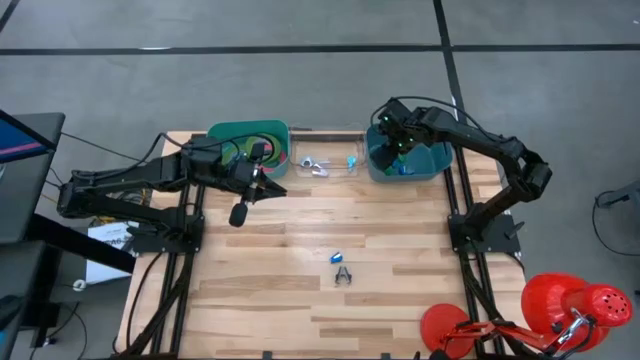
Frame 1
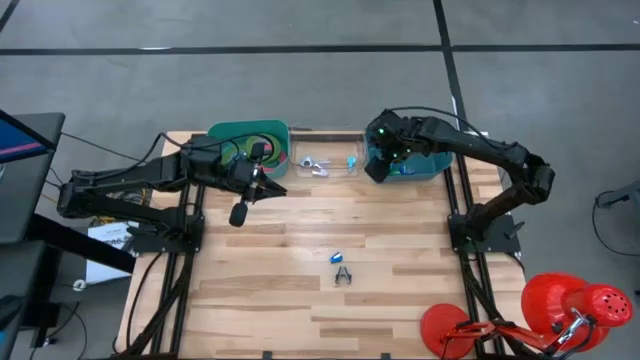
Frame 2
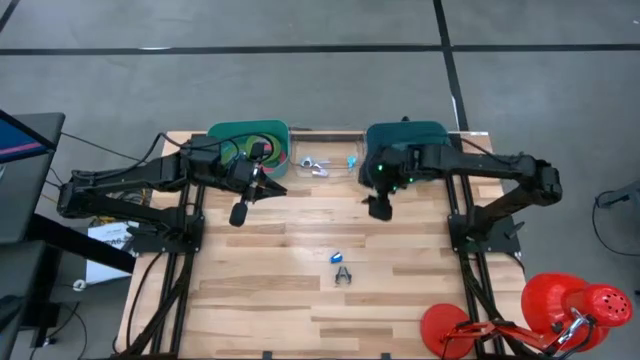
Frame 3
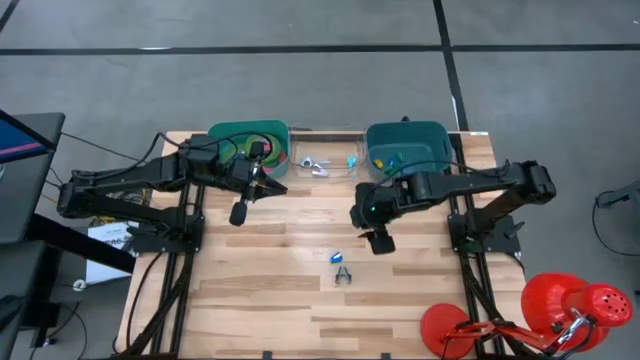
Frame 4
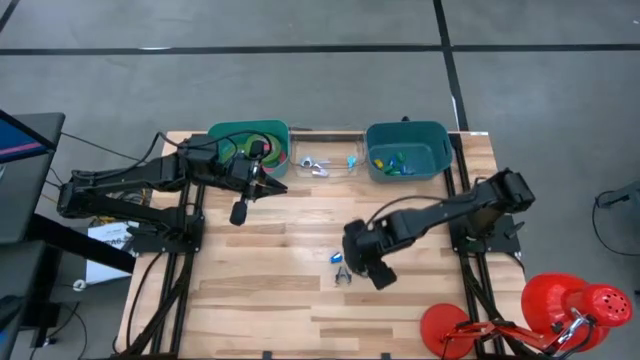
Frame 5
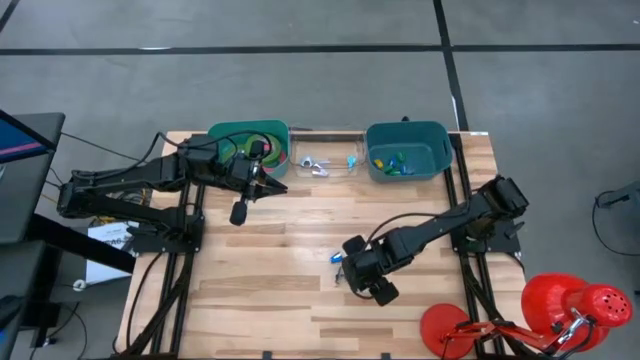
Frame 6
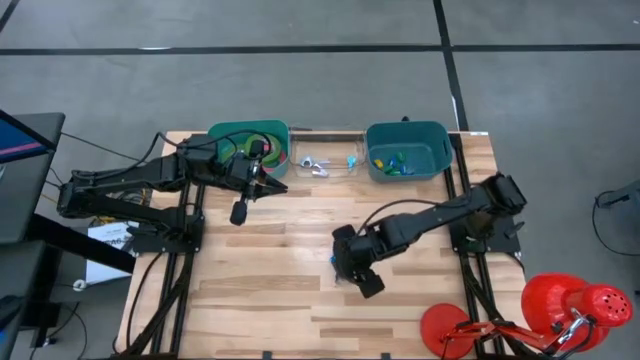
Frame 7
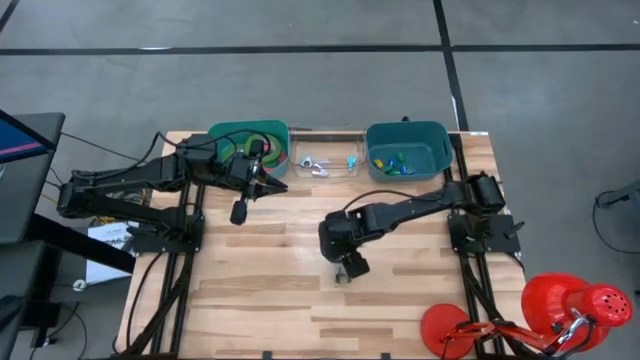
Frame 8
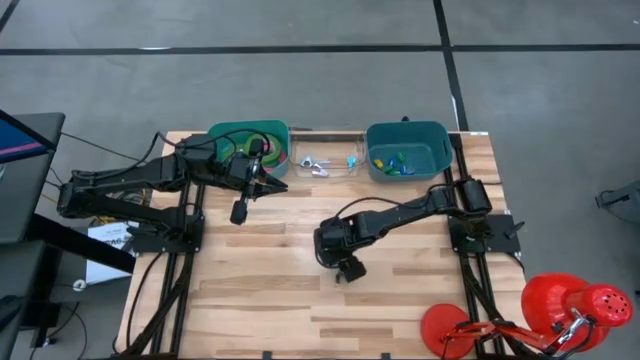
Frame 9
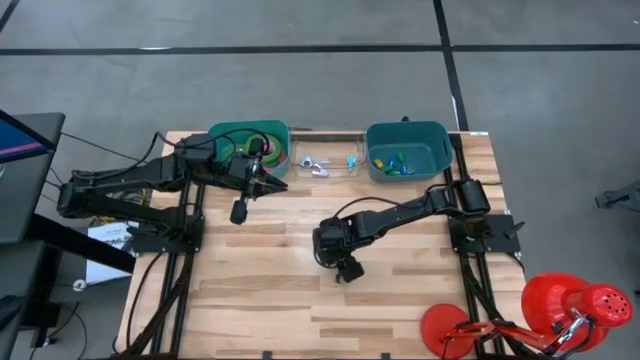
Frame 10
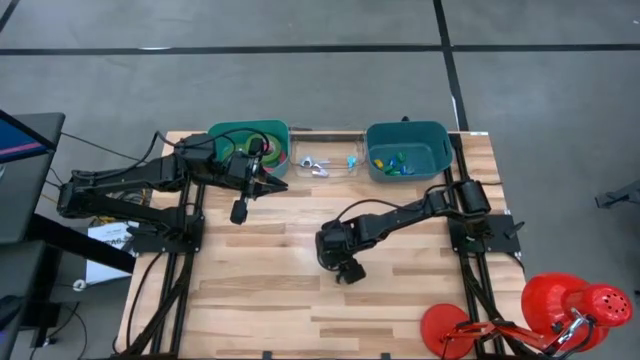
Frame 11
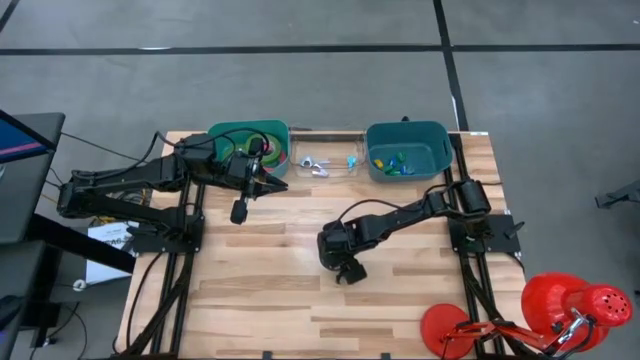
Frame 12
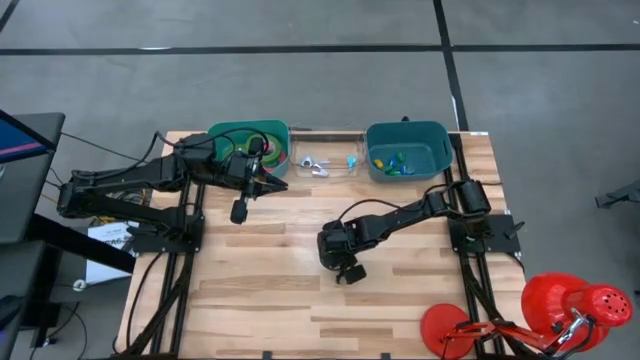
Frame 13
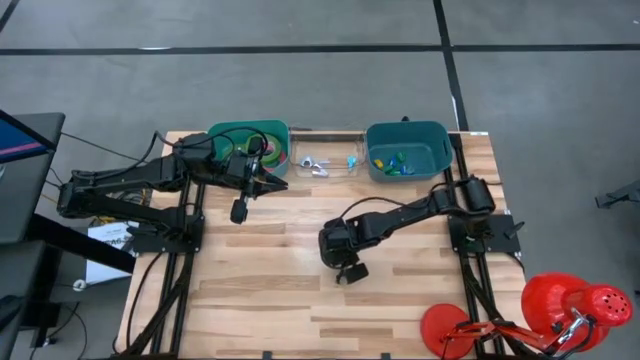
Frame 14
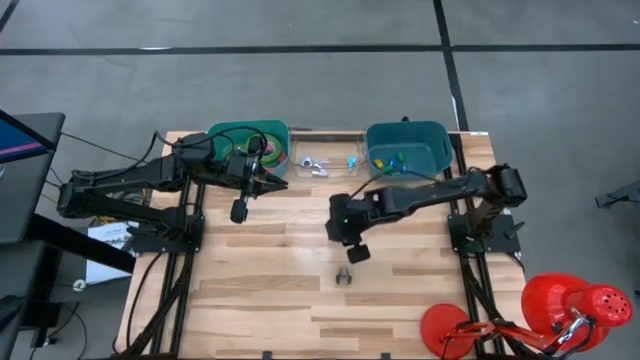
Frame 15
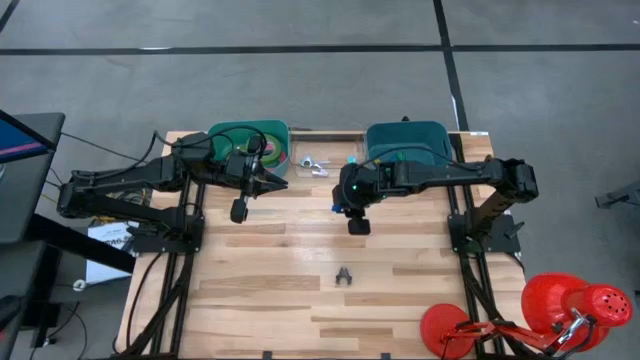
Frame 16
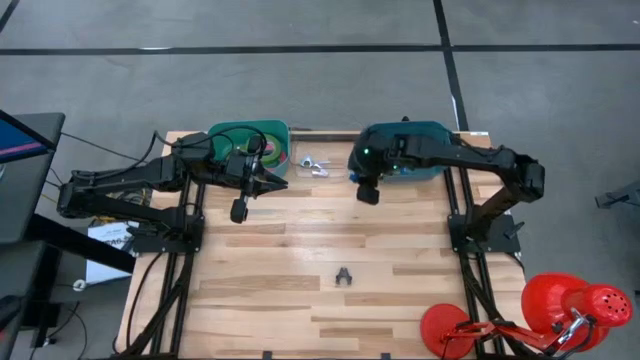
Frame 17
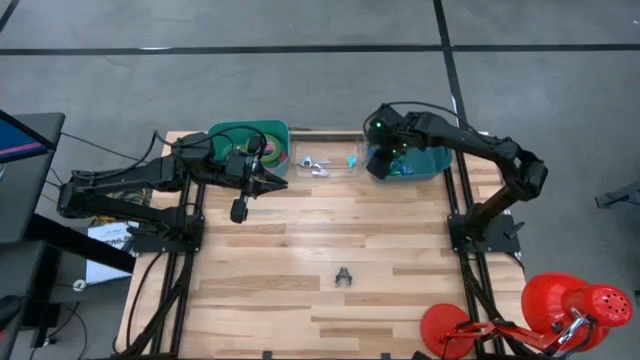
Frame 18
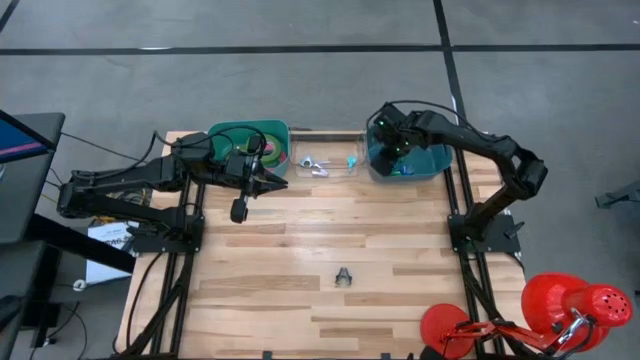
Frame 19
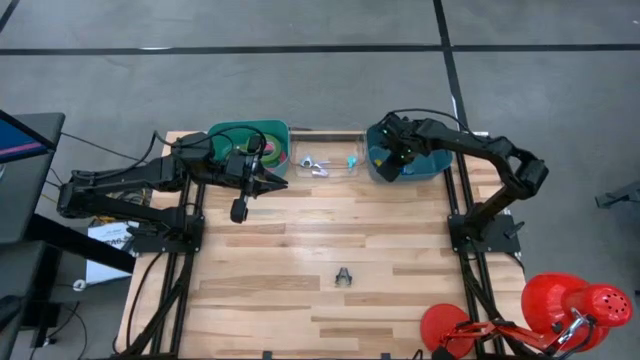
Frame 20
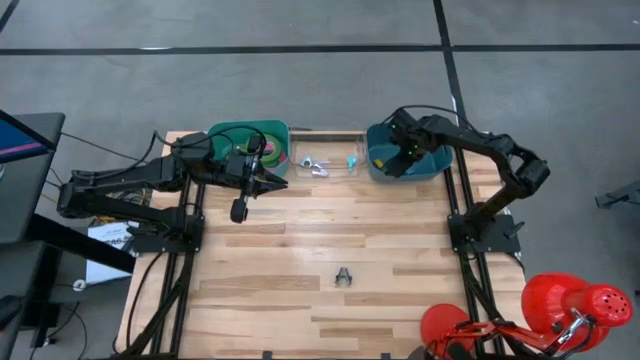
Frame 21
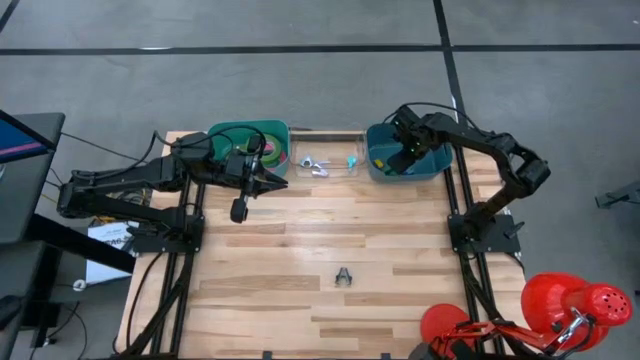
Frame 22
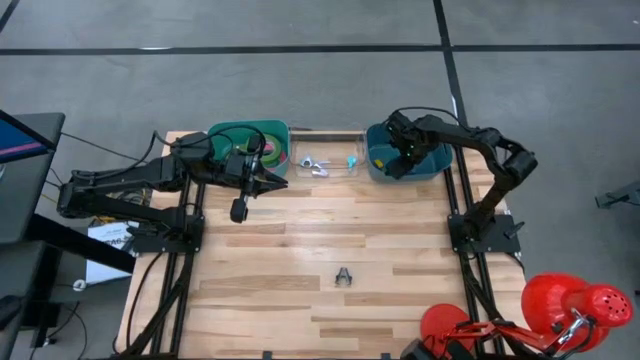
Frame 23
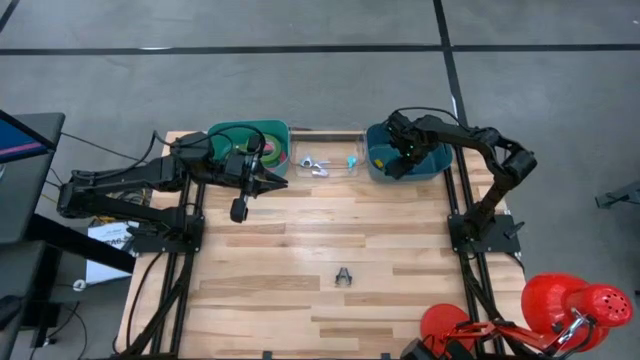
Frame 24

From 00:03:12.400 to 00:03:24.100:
Task: Pick and place Stapler, Stapler remover, tape
Put the blue stapler into the dark blue bin

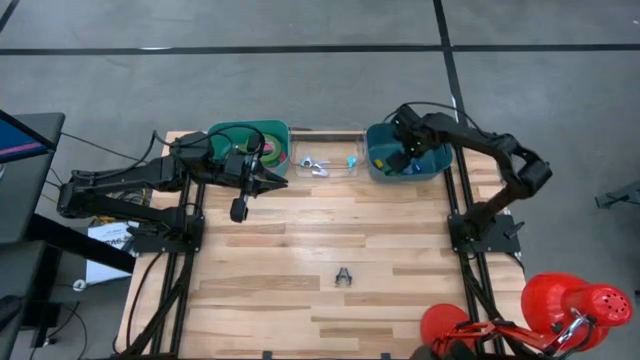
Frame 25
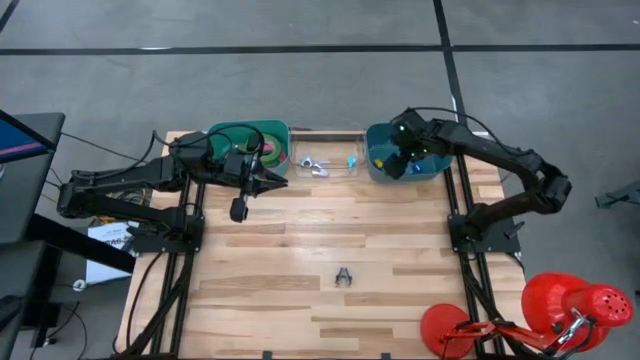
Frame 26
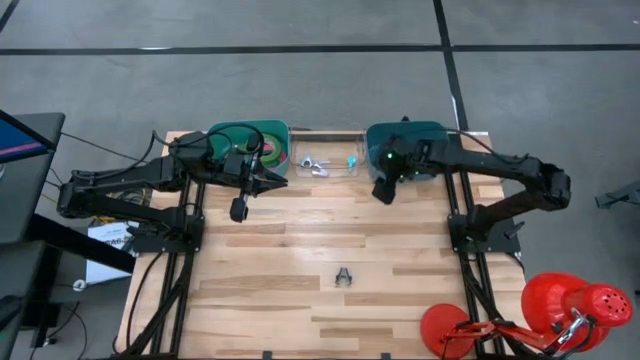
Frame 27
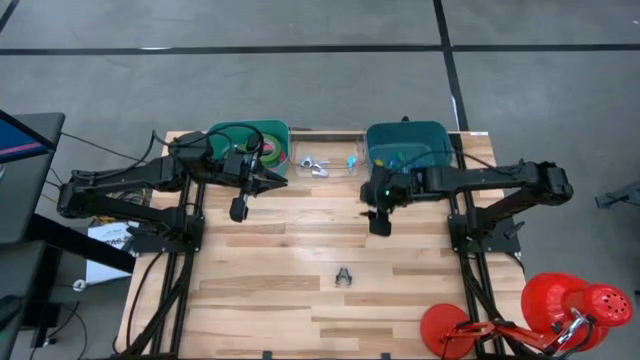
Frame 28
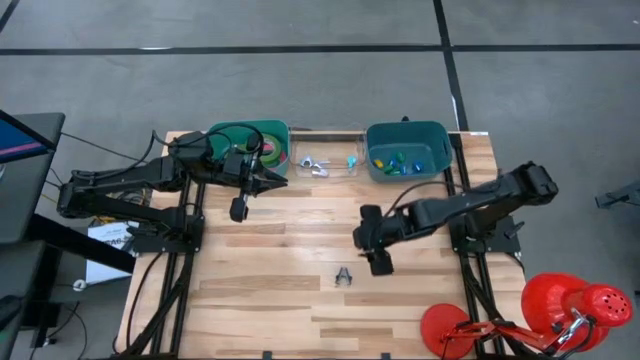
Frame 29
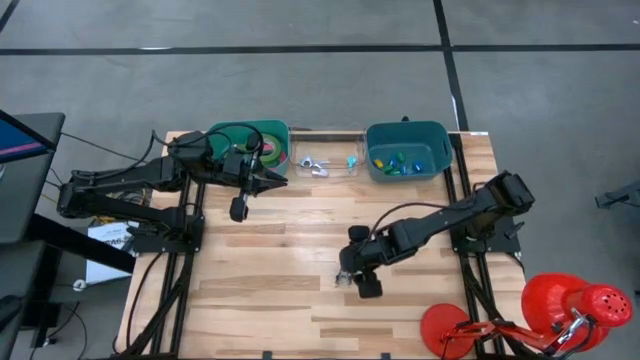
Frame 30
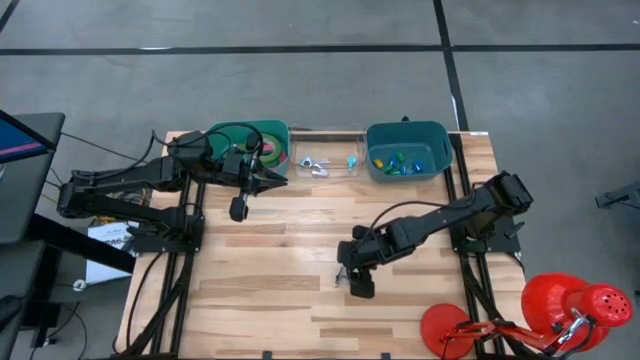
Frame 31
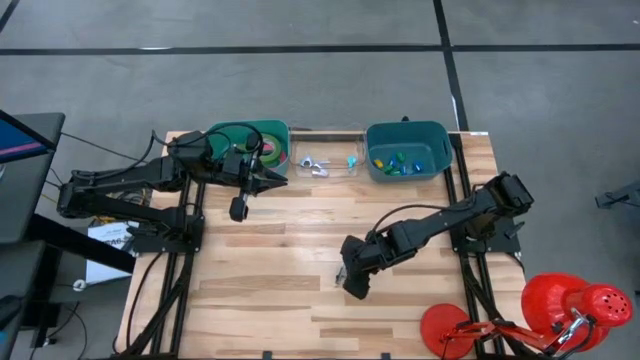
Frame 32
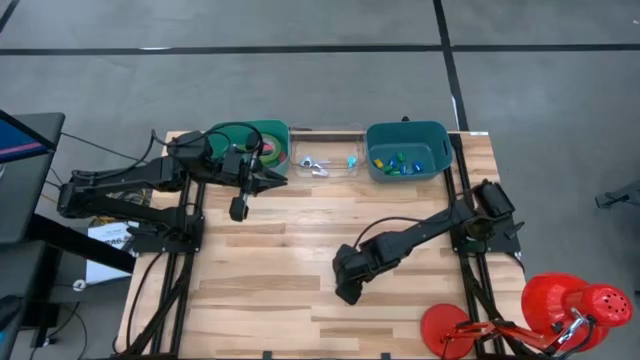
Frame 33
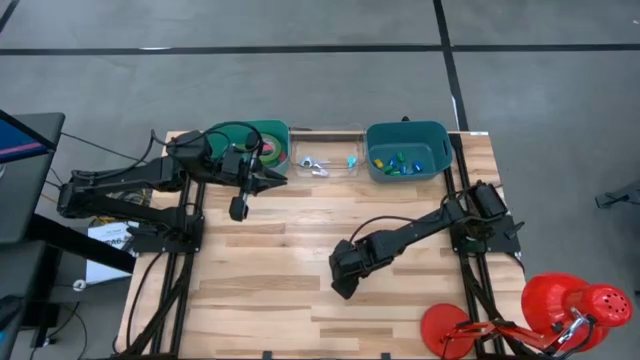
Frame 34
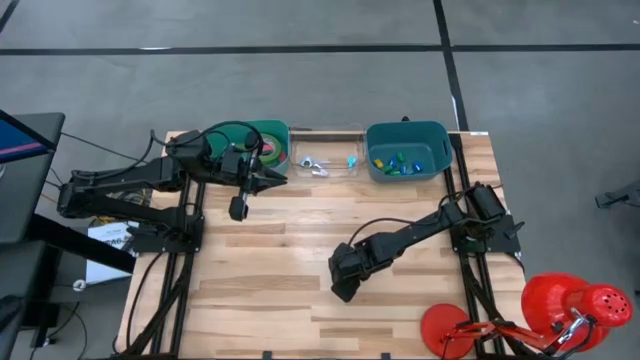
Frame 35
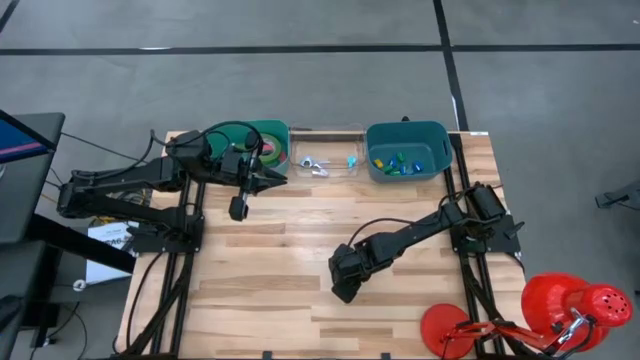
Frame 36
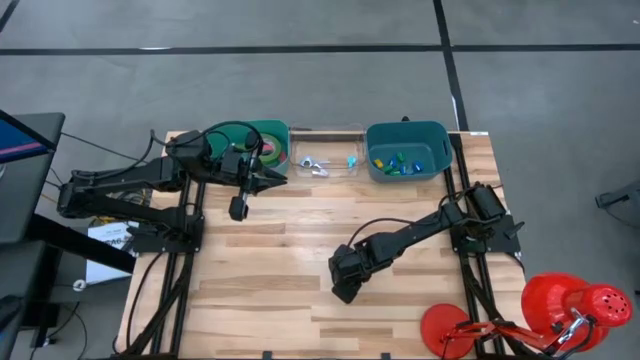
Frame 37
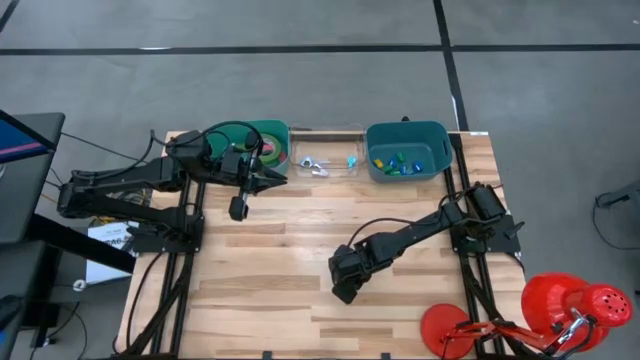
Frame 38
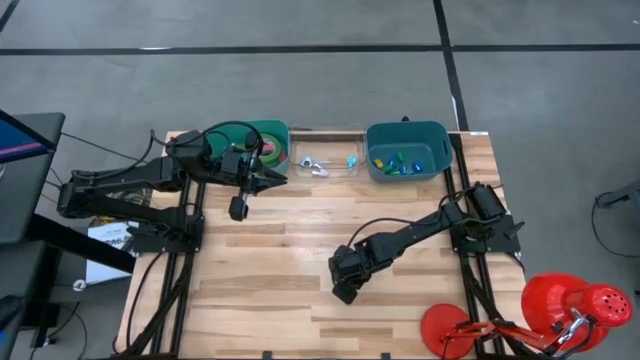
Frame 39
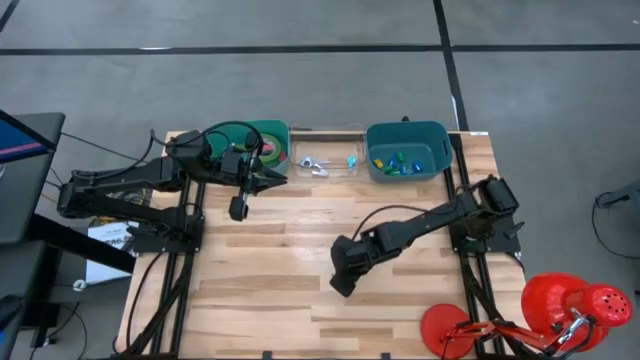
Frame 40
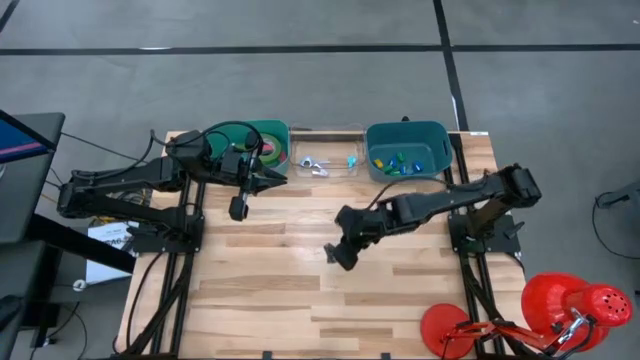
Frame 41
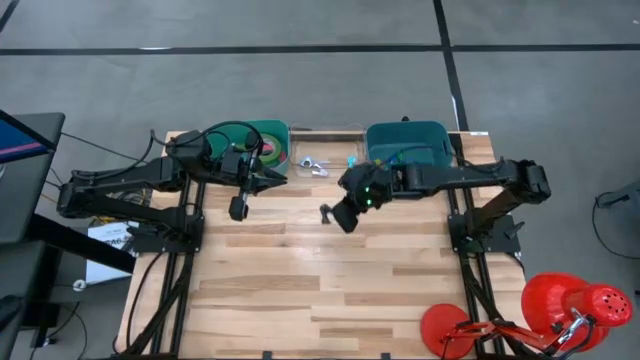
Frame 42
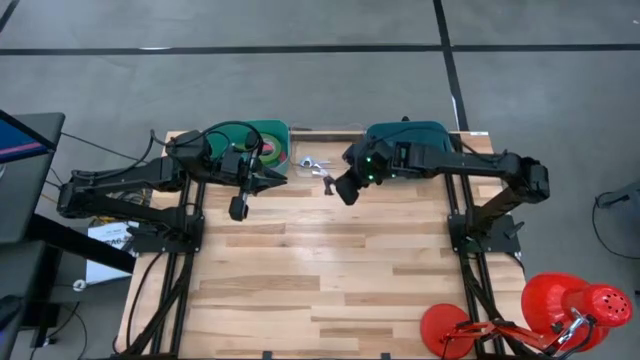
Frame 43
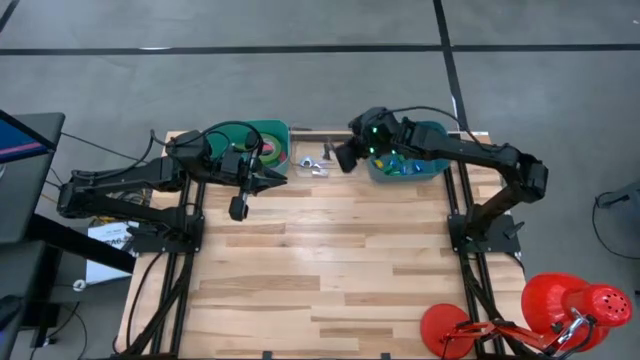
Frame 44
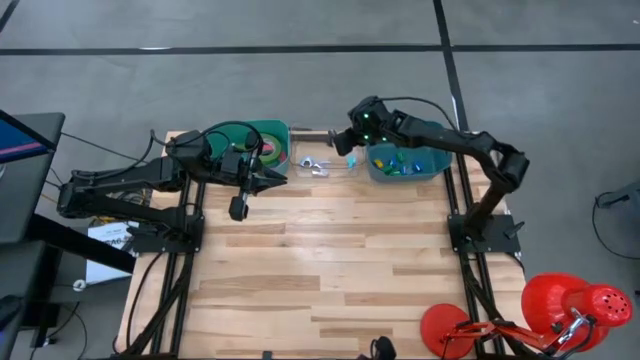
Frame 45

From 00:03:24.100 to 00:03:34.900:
Put the black staple remover into the transparent bin
